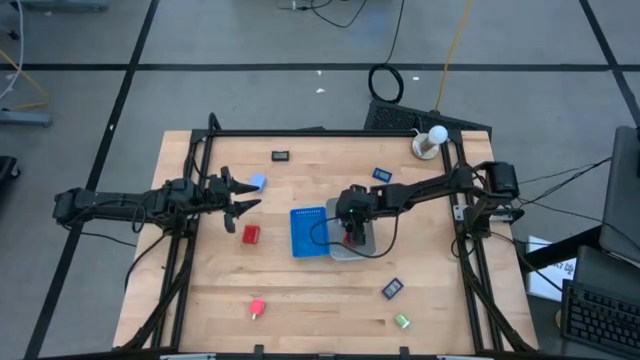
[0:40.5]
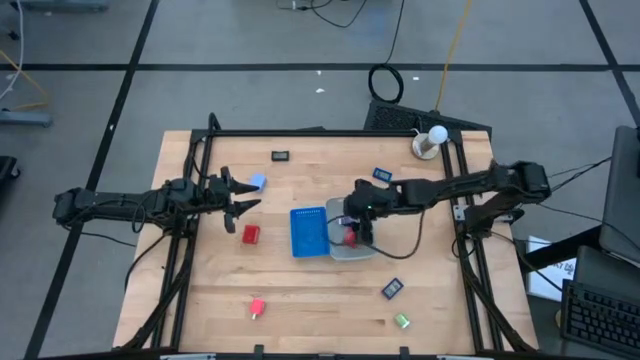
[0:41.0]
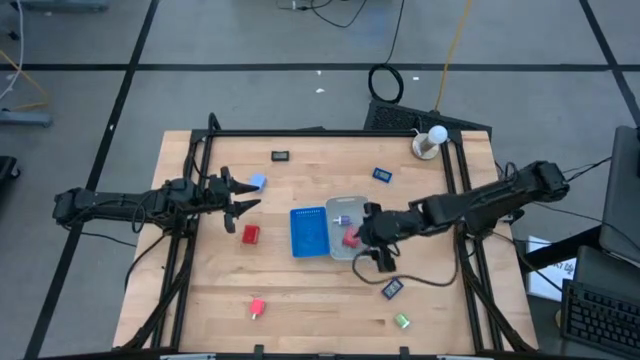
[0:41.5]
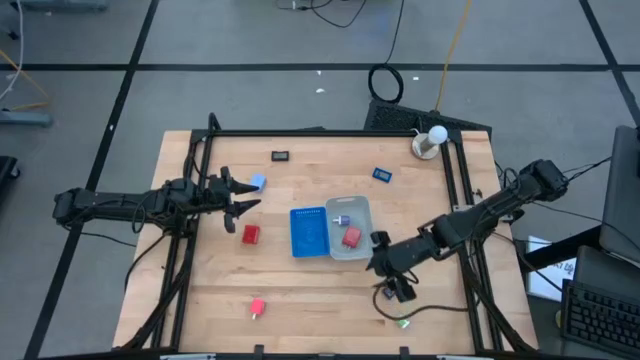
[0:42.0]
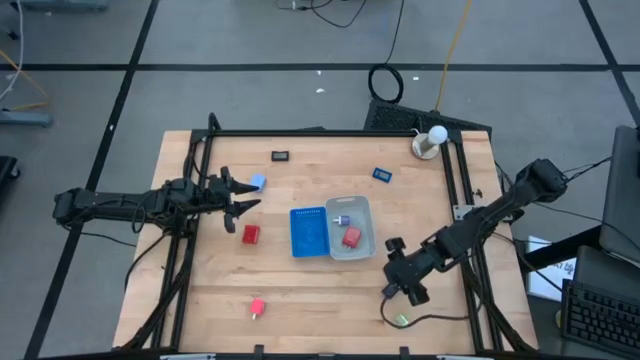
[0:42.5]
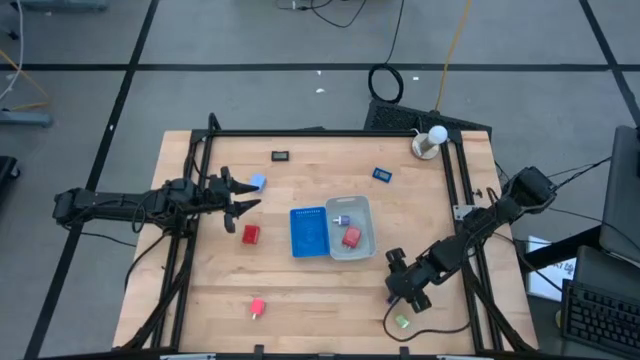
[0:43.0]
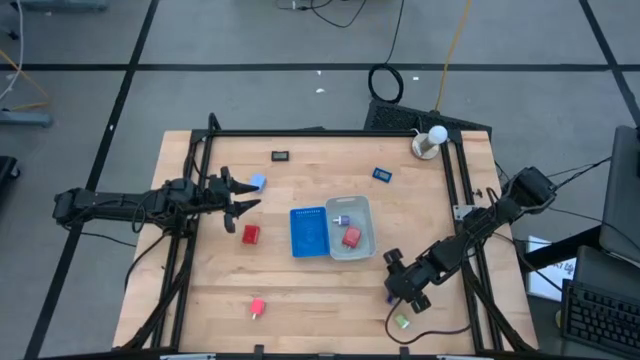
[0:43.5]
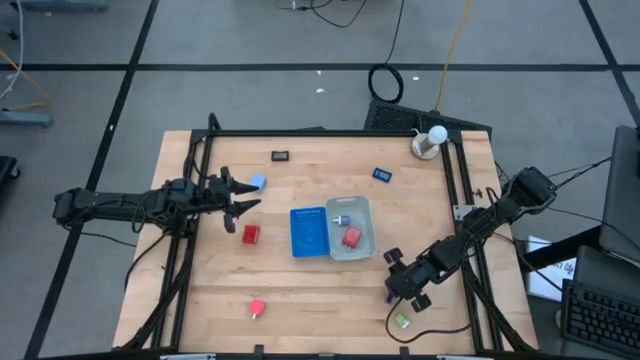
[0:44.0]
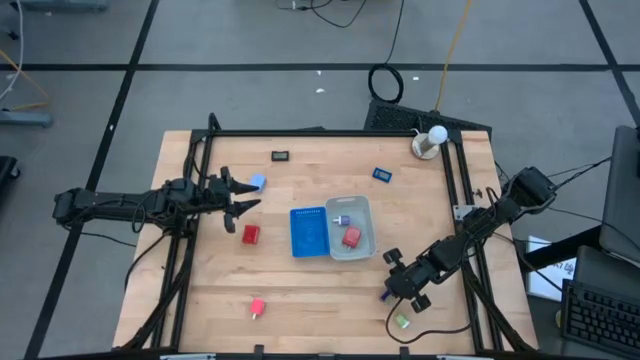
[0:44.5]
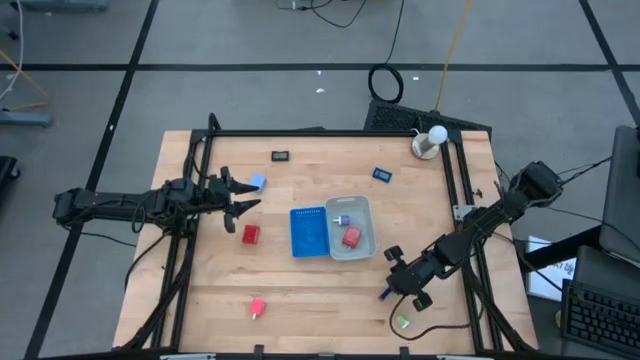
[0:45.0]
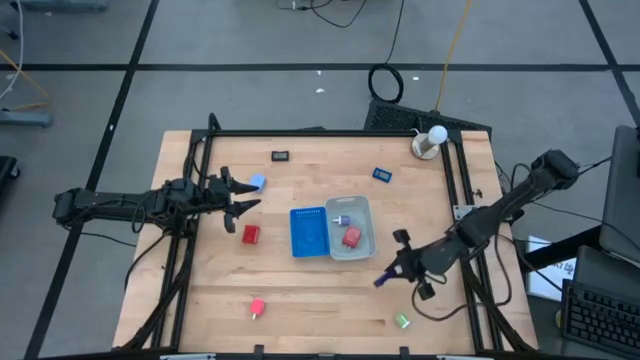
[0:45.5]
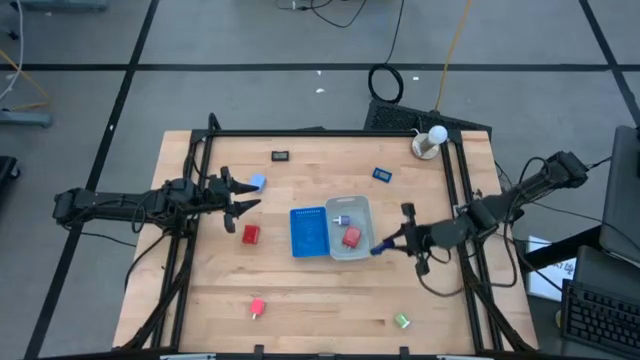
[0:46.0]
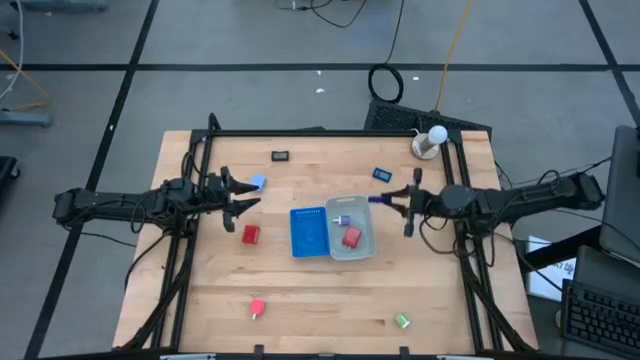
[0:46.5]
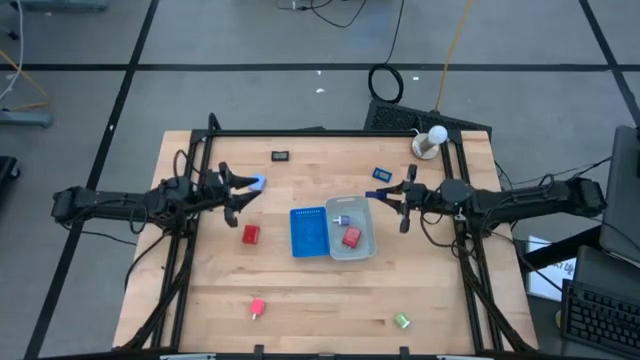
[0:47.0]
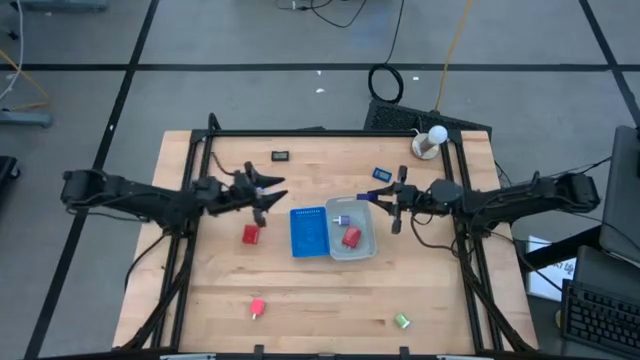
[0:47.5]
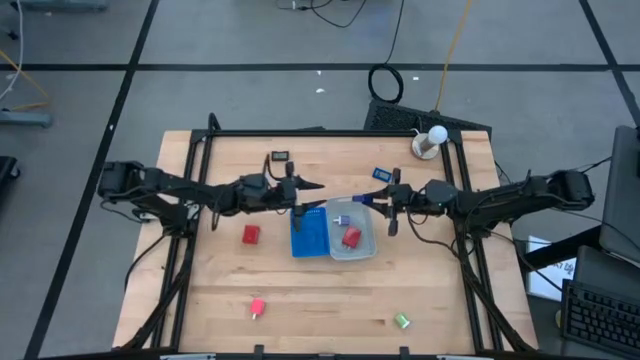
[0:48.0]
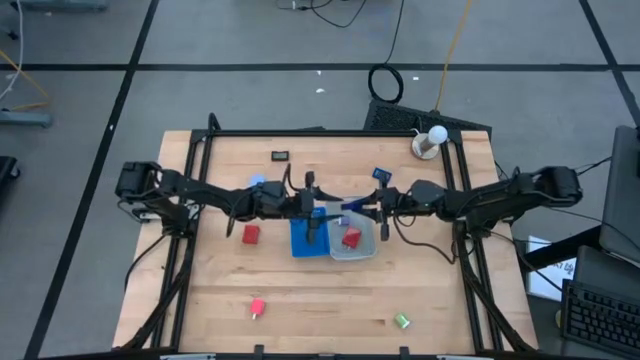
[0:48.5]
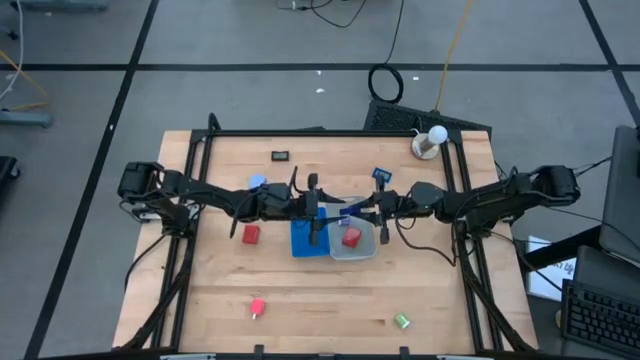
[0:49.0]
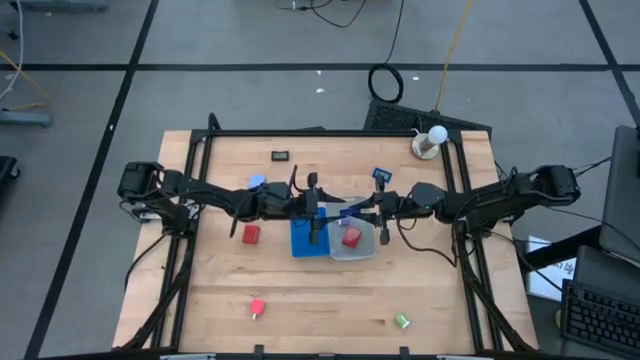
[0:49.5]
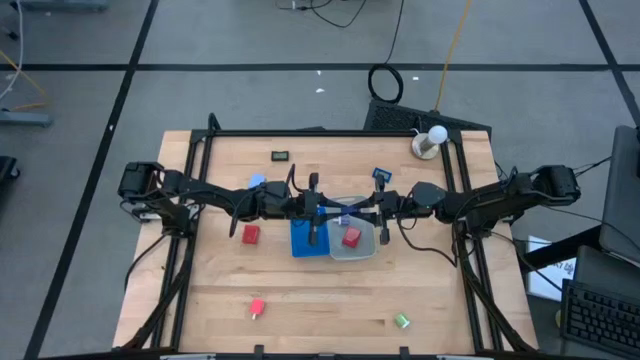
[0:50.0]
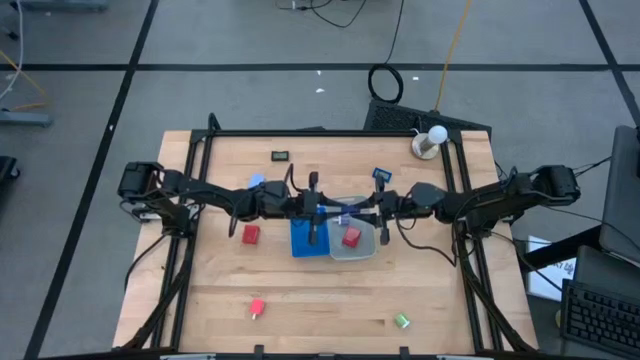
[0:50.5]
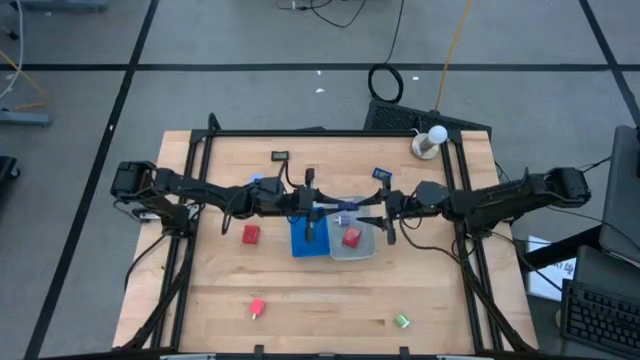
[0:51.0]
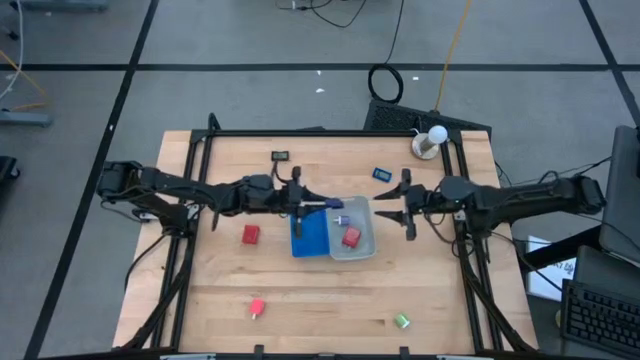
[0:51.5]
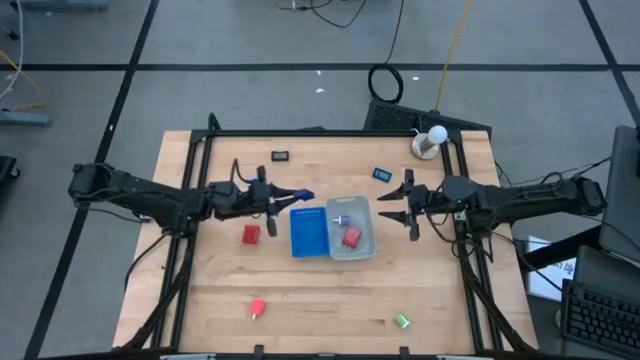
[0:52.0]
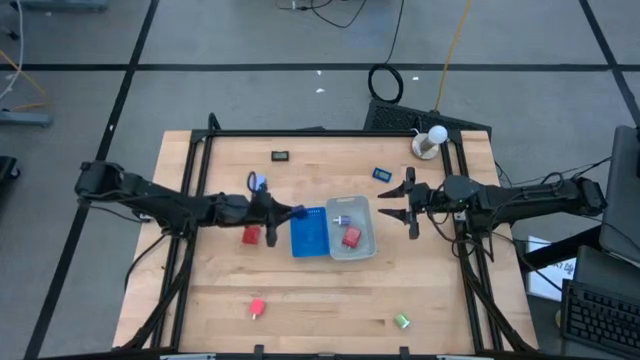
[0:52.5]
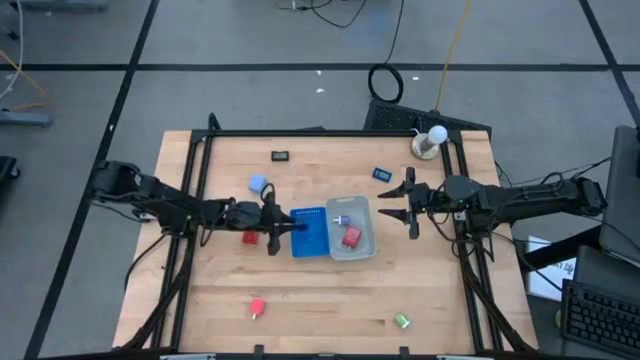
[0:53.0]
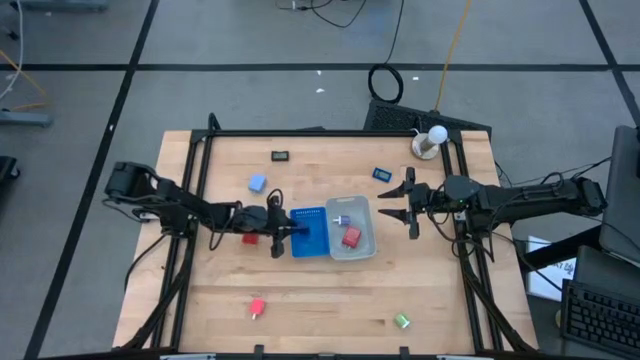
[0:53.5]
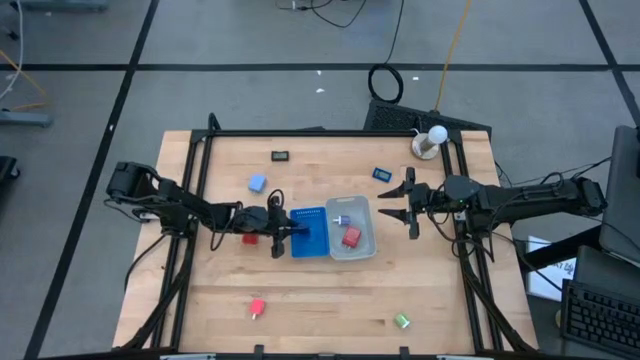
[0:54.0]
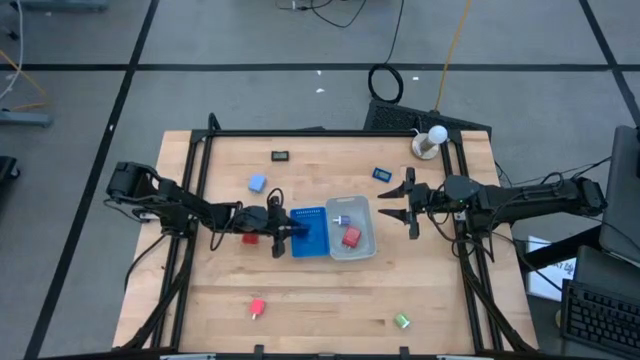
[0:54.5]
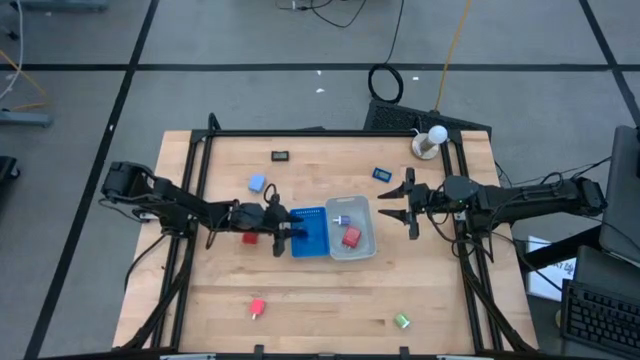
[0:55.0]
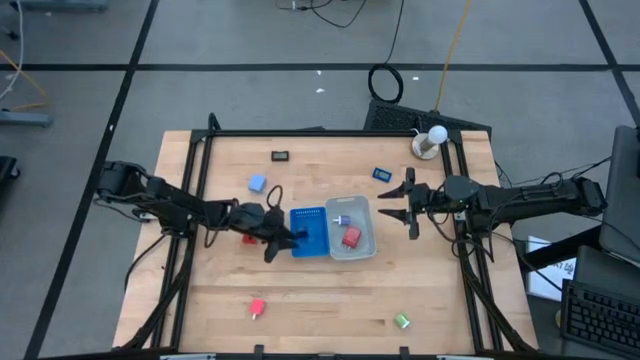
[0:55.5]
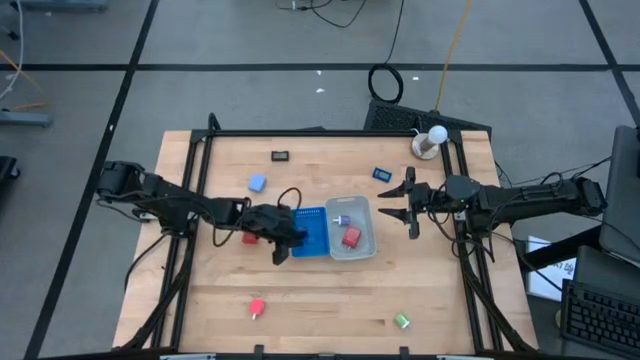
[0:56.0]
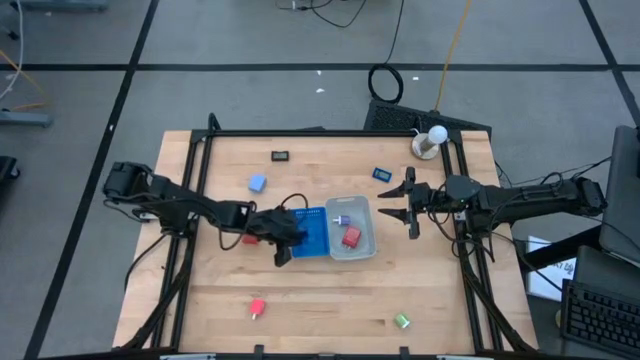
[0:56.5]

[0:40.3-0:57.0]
Task: Pick & Place Office items
Put the dark blue digital timer into the blue bin

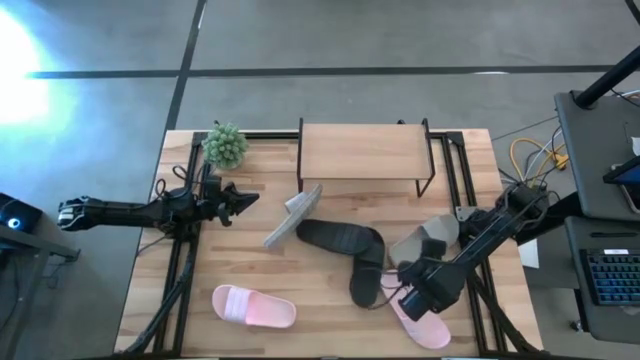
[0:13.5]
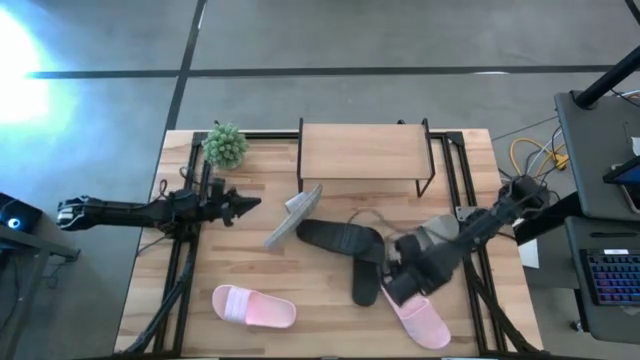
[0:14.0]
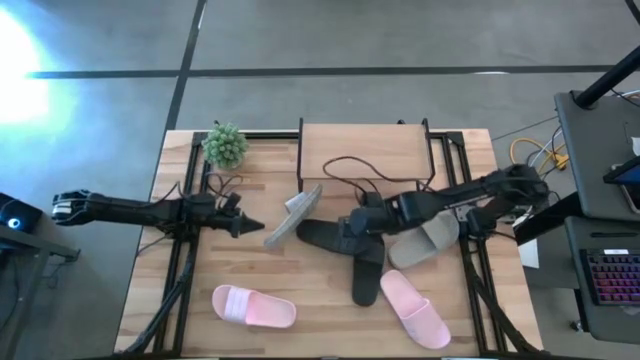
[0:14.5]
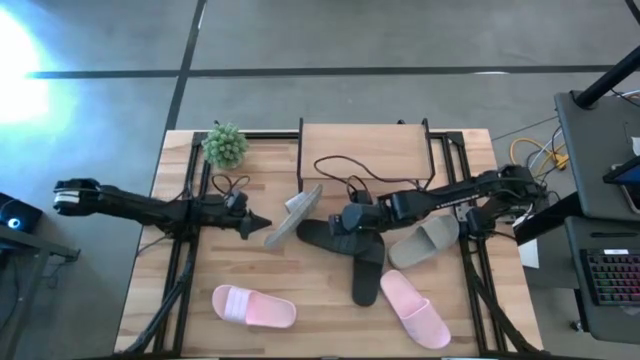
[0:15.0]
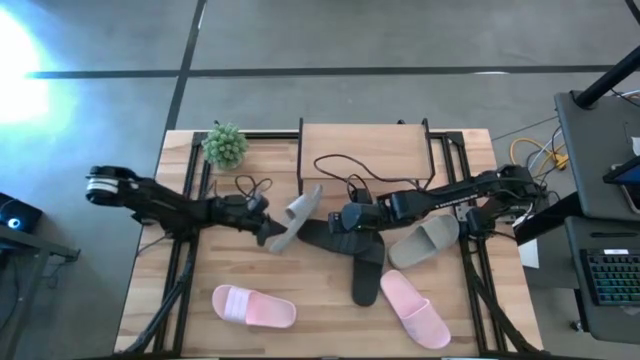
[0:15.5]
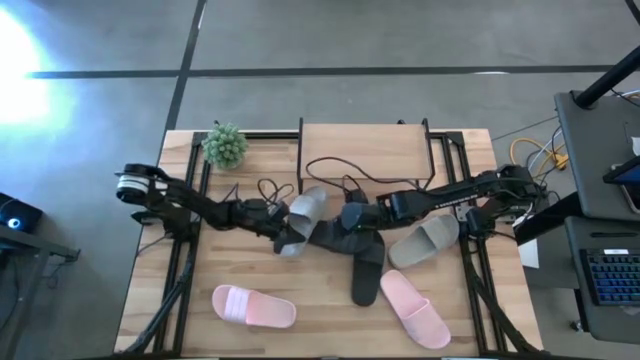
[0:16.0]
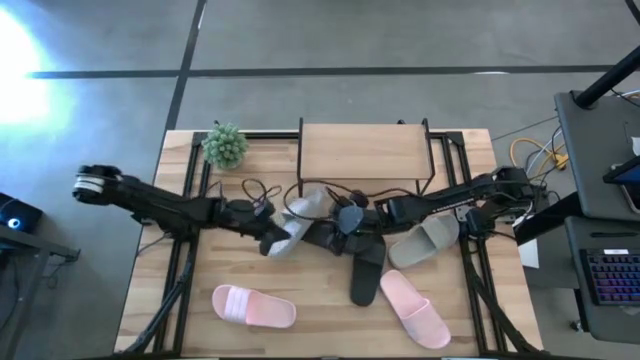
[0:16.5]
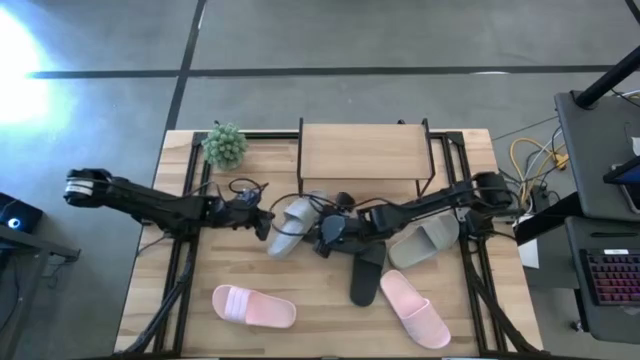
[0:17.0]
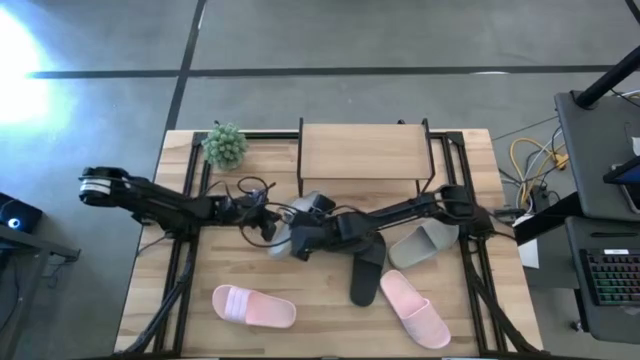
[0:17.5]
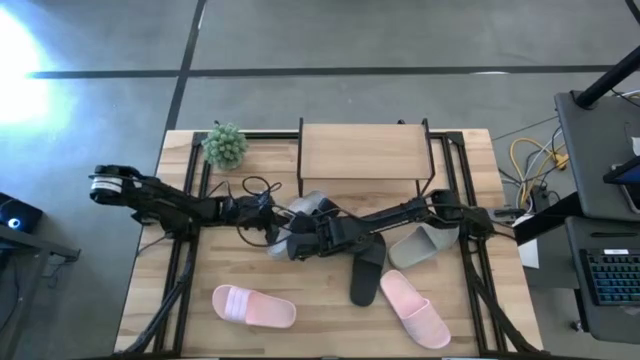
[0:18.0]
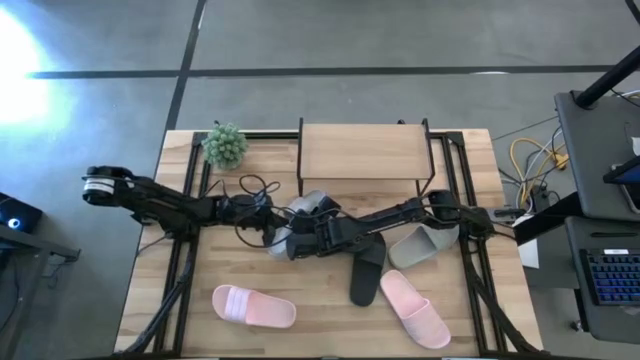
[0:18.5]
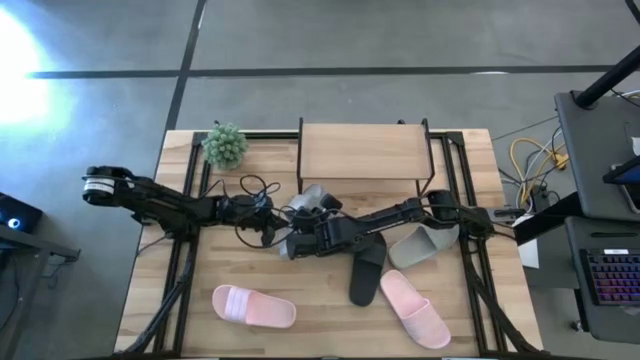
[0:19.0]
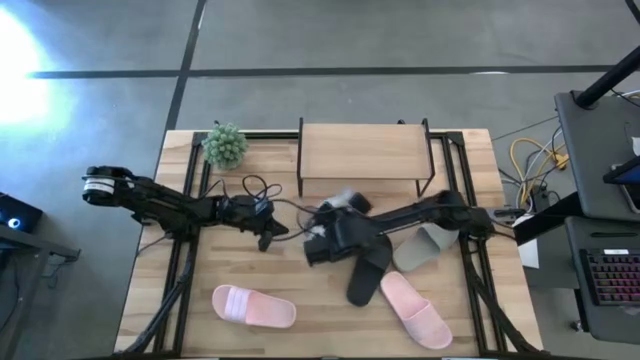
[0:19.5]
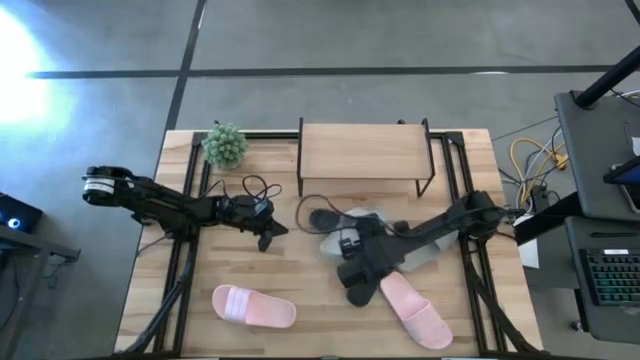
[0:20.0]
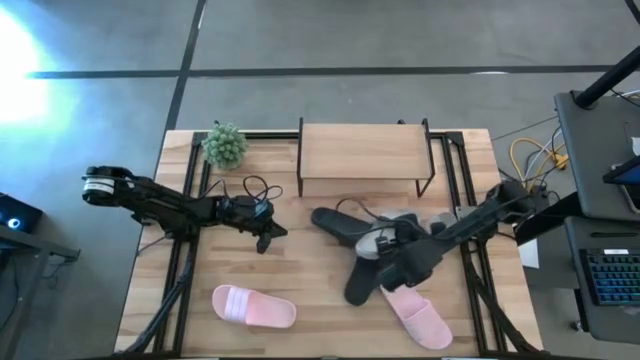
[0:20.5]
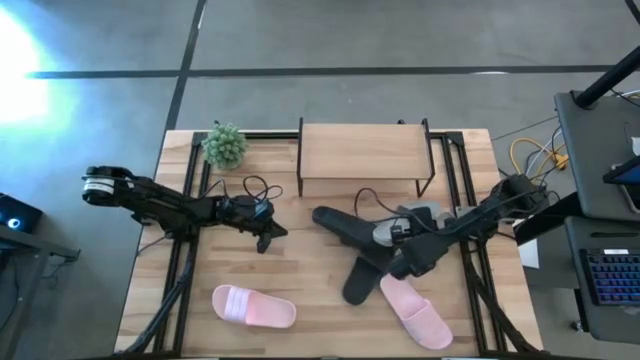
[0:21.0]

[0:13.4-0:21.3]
Task: Pick and place slides into the shelf
Move the left gray slipper to the middle right of the table
